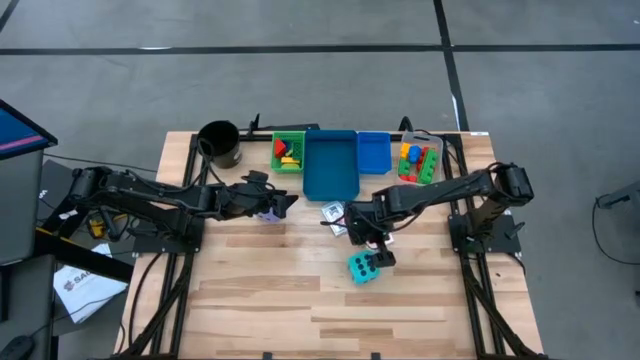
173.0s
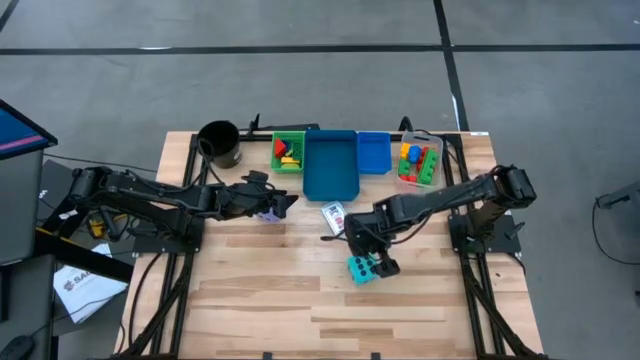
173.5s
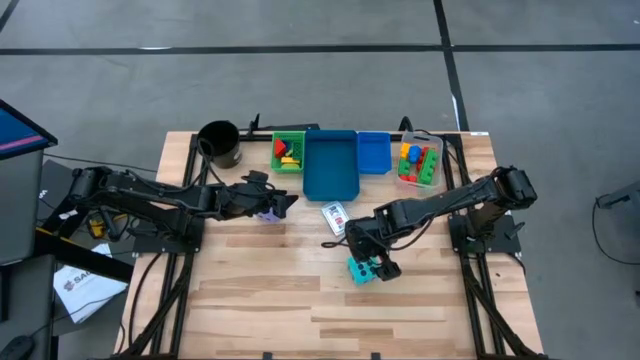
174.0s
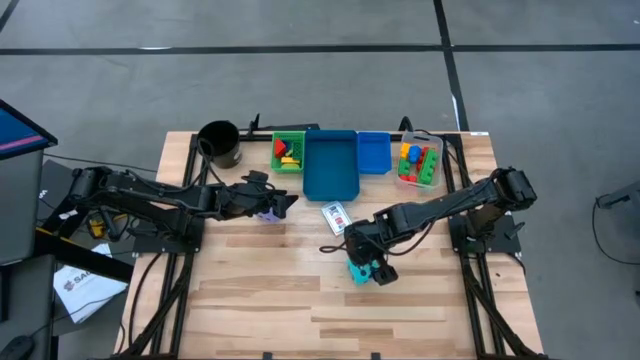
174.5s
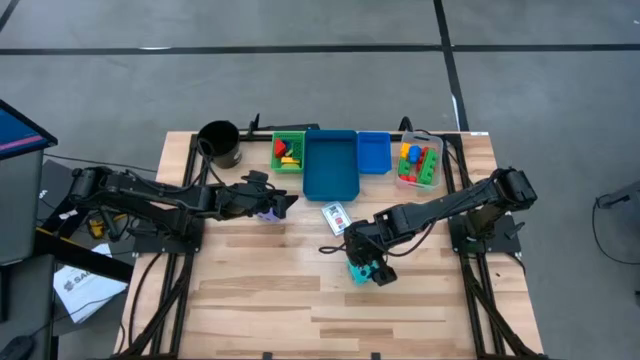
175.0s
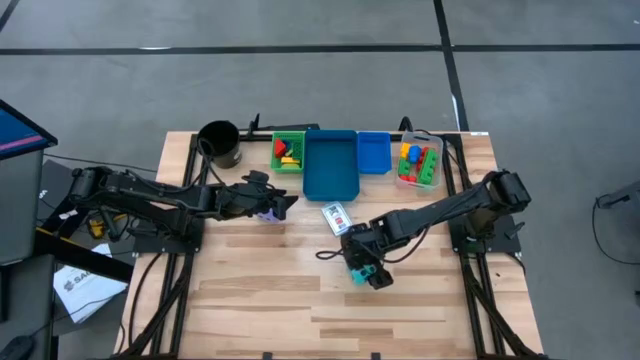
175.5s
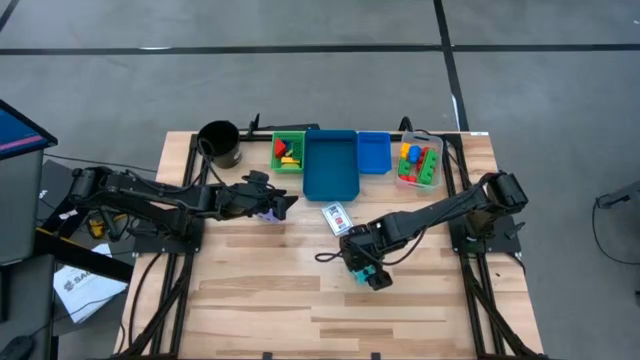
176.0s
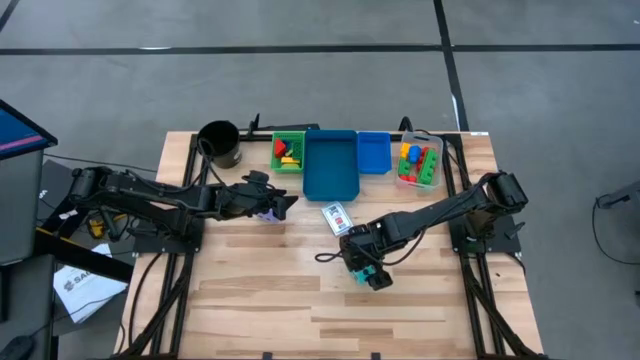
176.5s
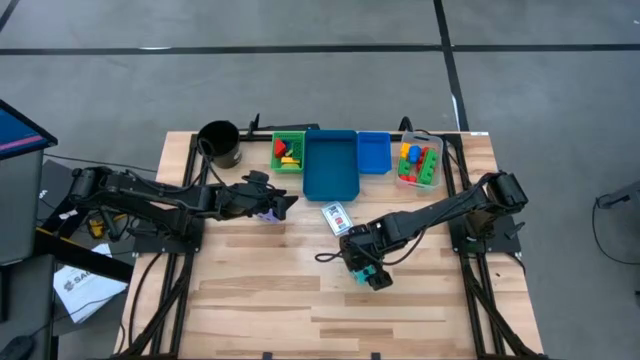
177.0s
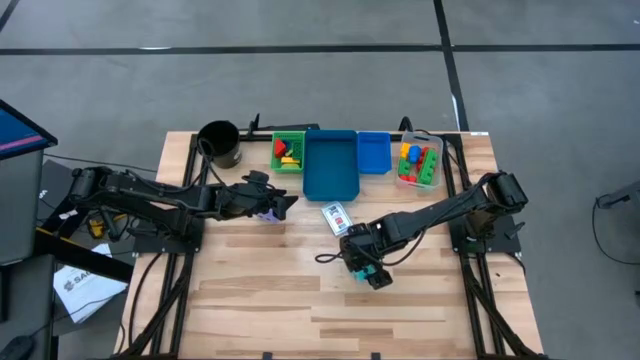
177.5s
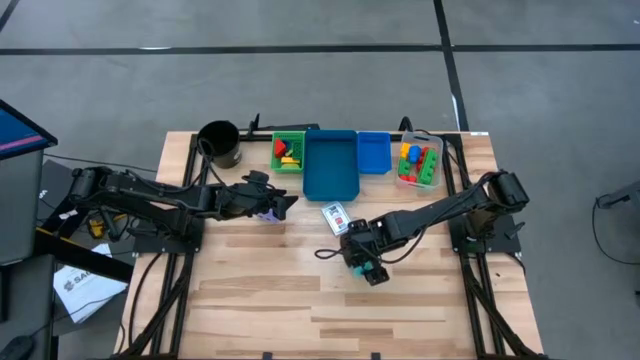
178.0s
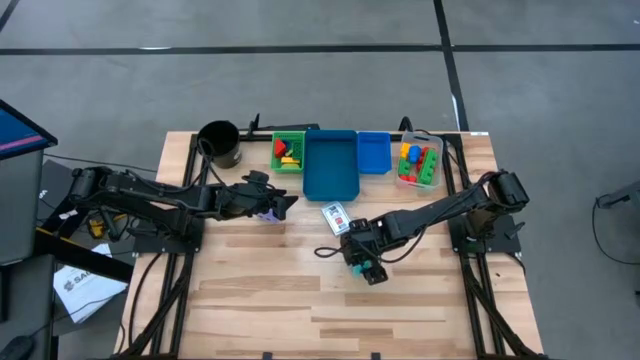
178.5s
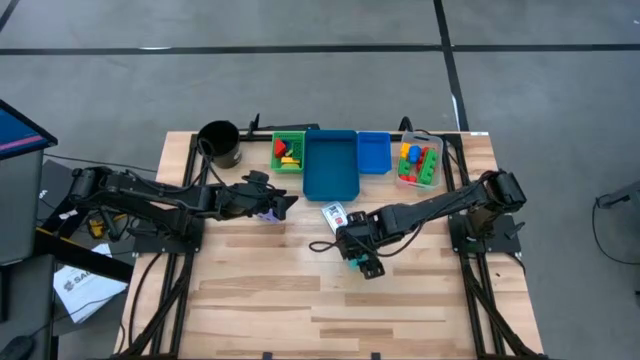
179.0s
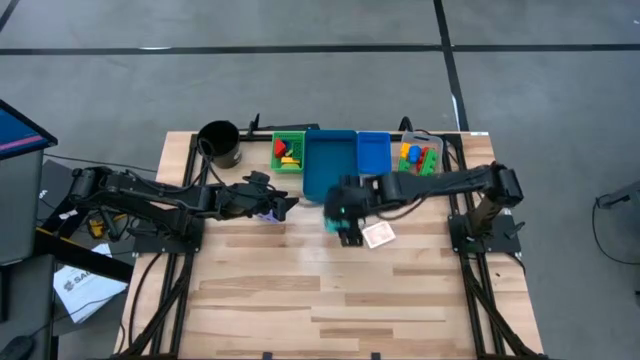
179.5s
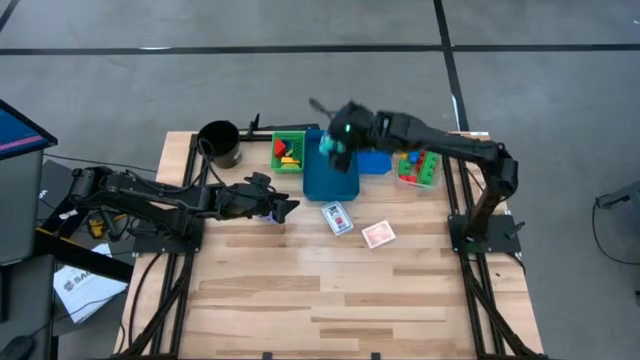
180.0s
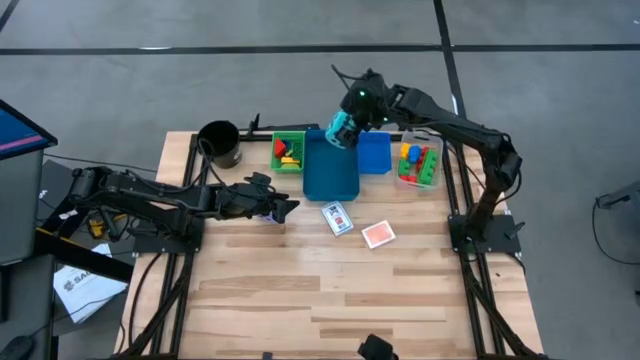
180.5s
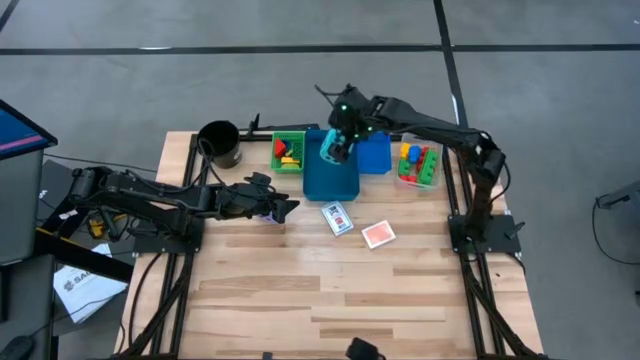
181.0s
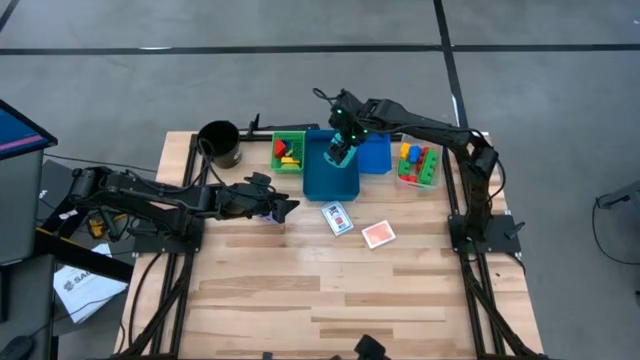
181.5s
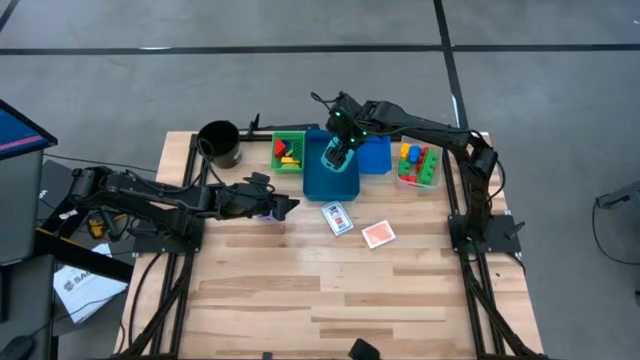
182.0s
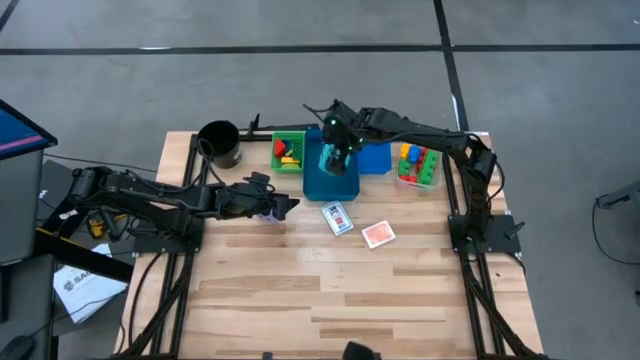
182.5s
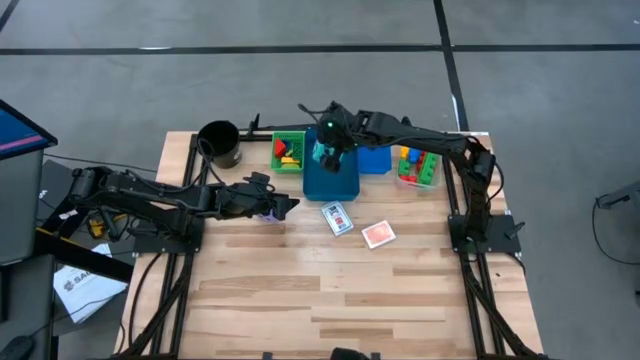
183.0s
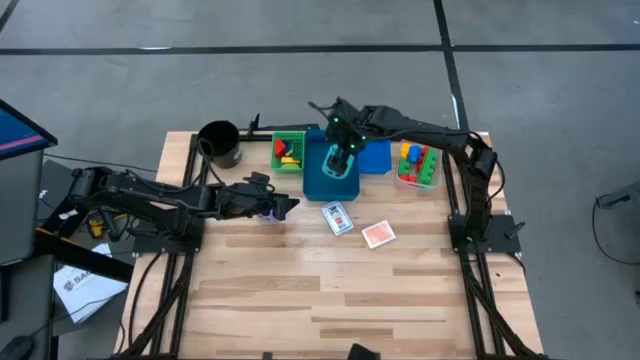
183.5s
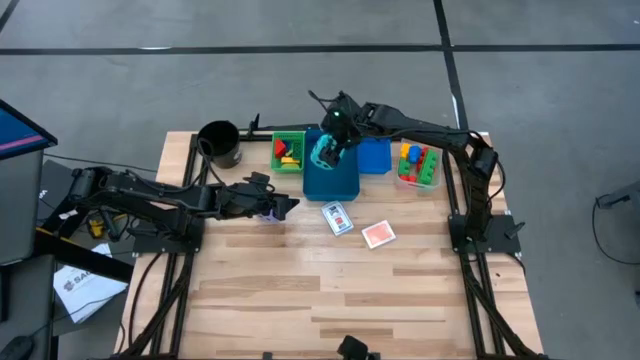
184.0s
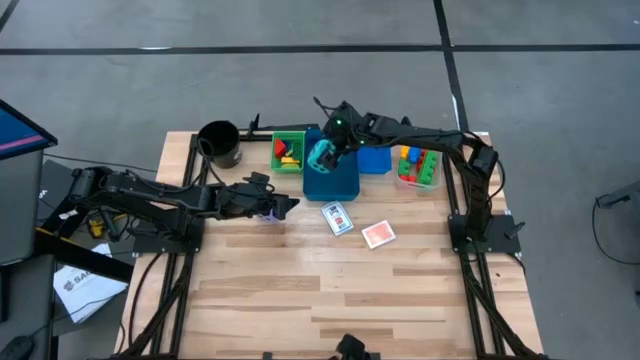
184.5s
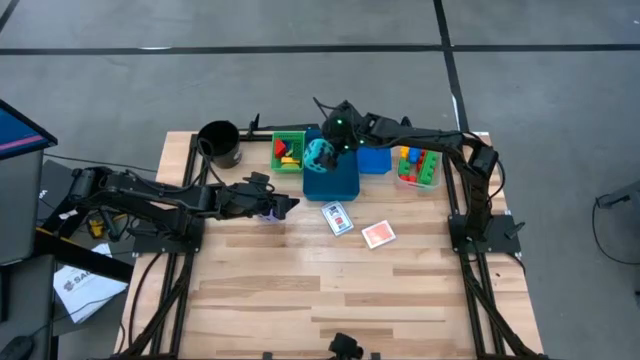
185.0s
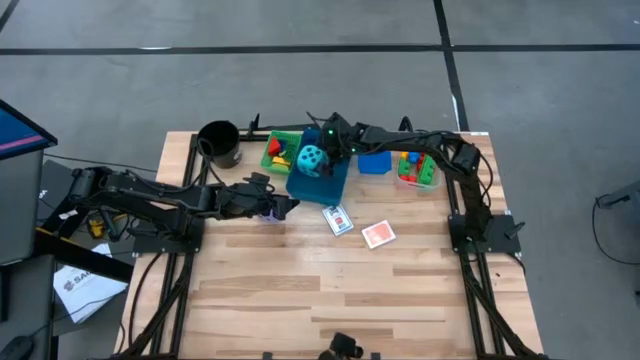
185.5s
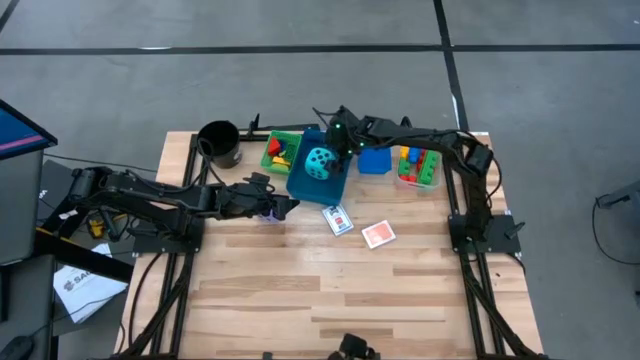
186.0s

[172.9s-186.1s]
Task: Pick & Place Toys
Put the blue die into the blue bin

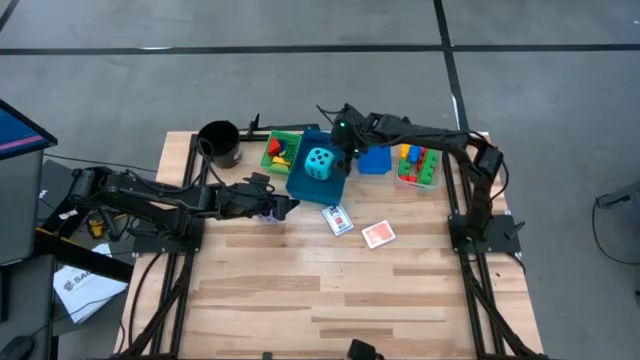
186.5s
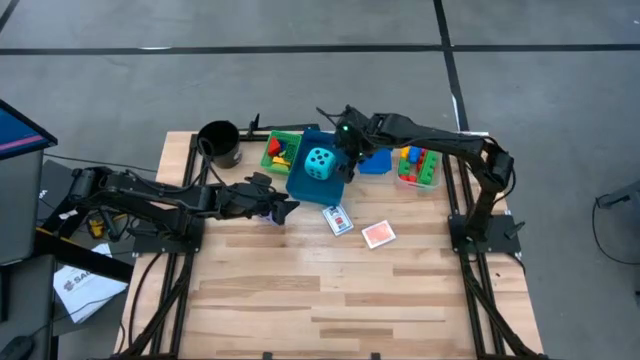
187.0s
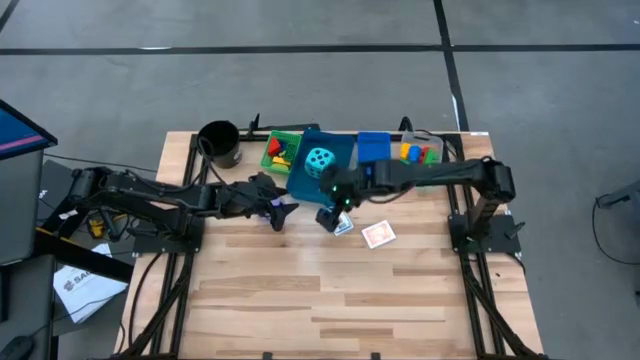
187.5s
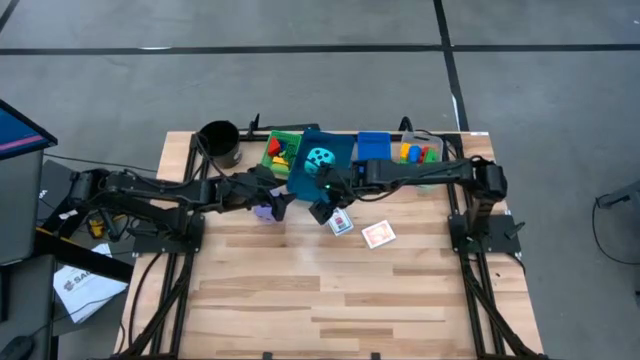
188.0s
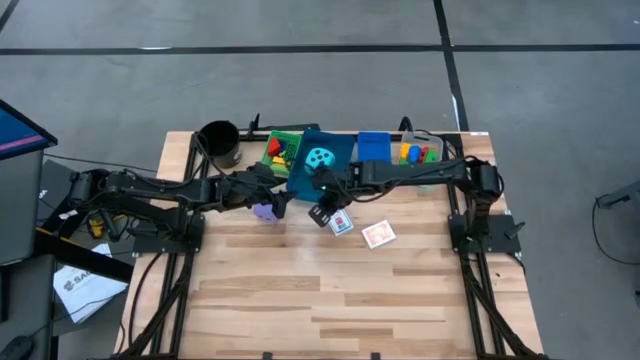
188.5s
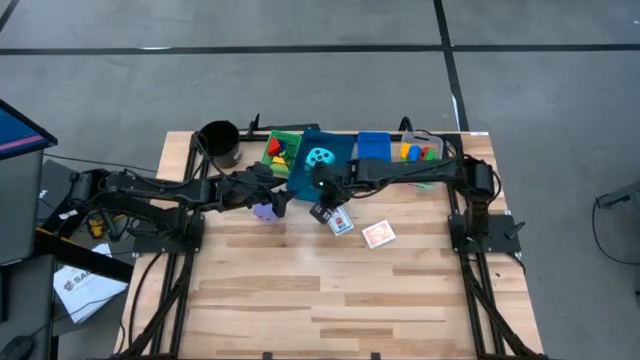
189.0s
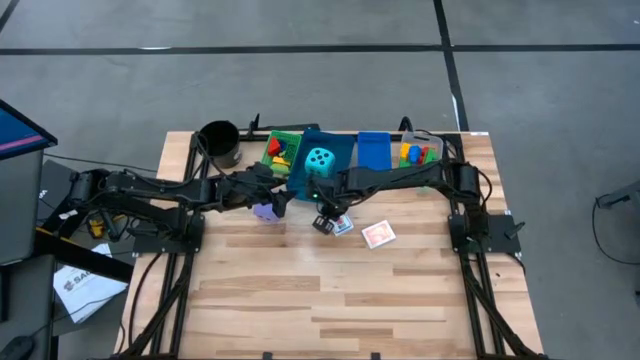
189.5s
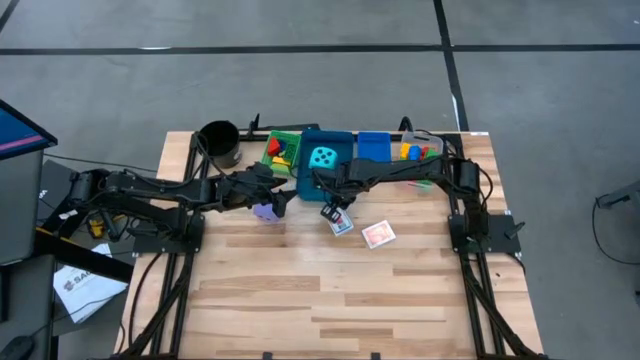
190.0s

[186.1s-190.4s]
Adjust the blue bin on the table

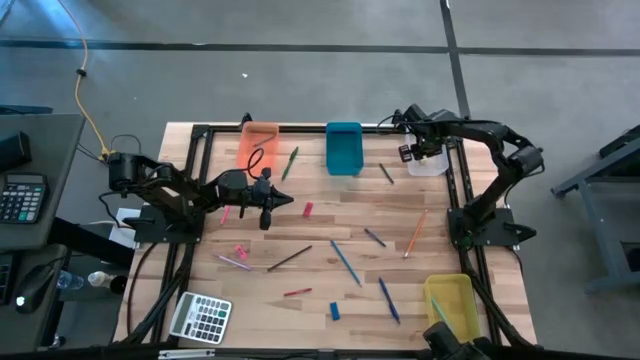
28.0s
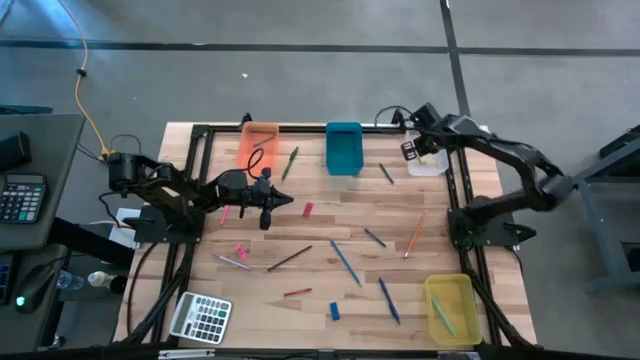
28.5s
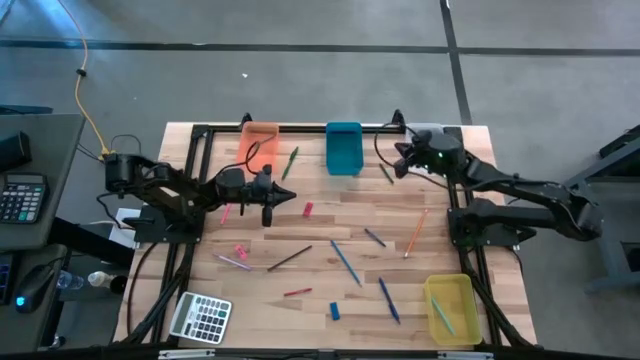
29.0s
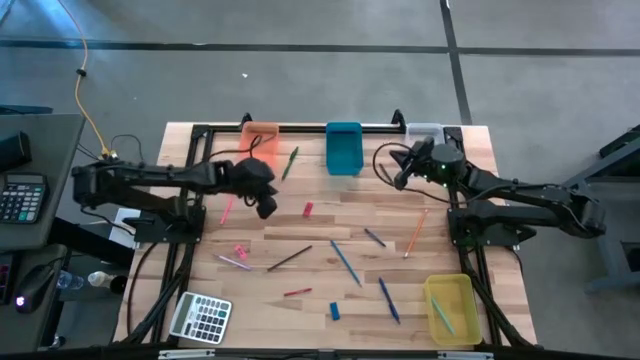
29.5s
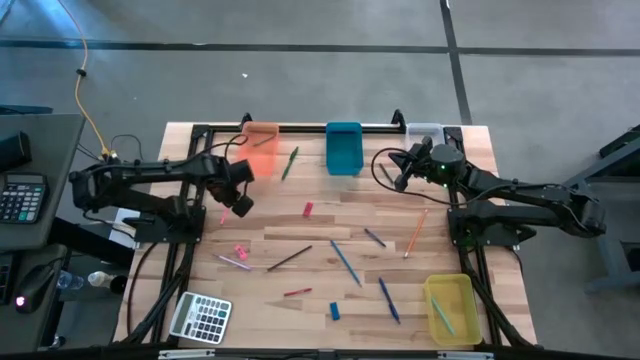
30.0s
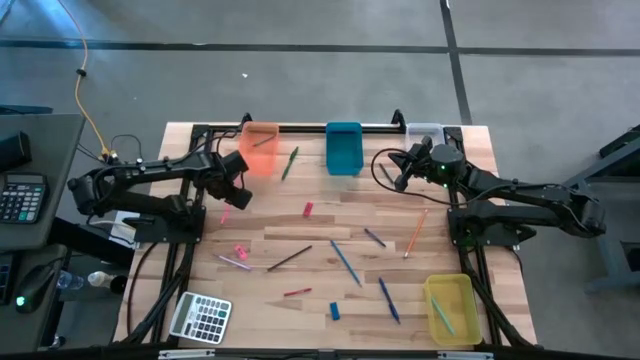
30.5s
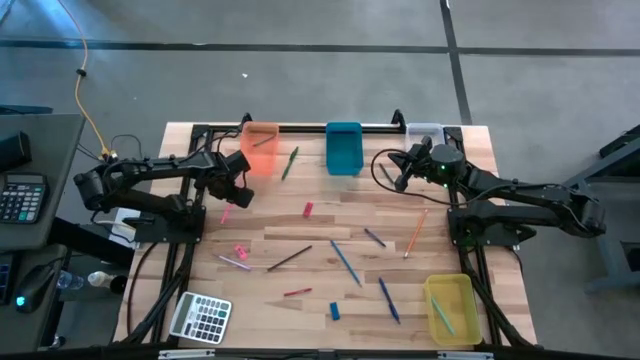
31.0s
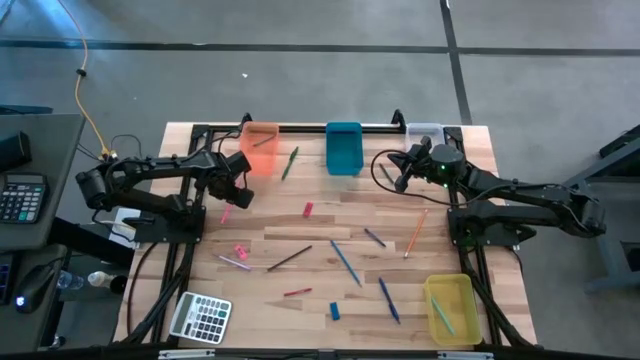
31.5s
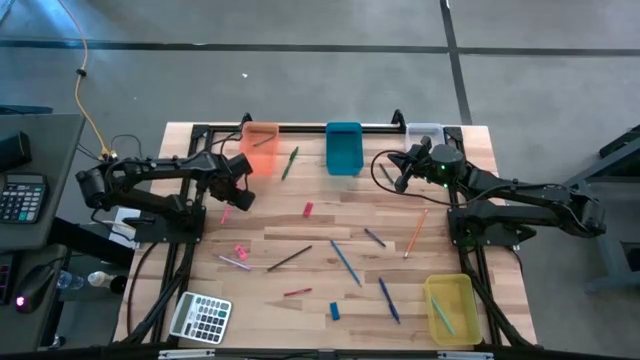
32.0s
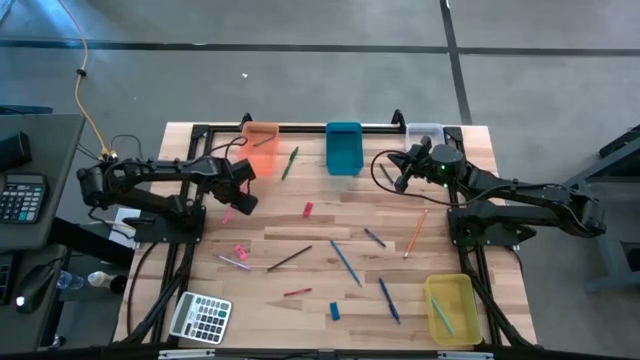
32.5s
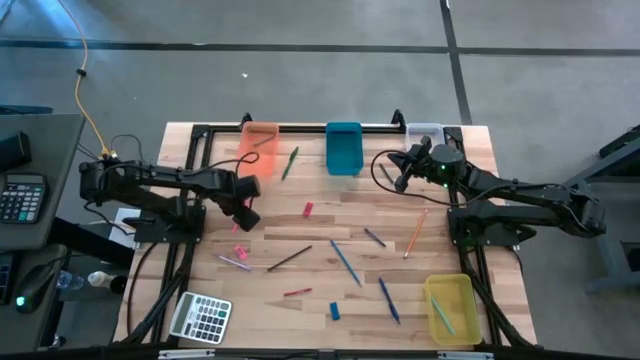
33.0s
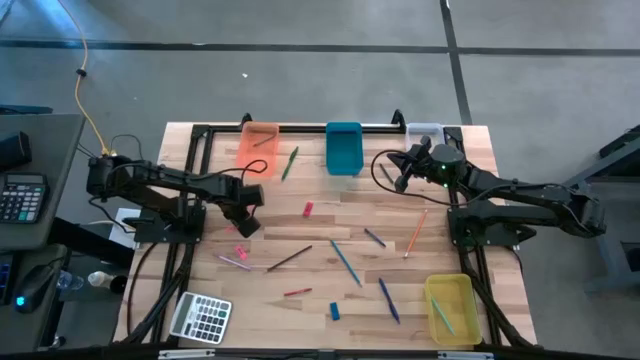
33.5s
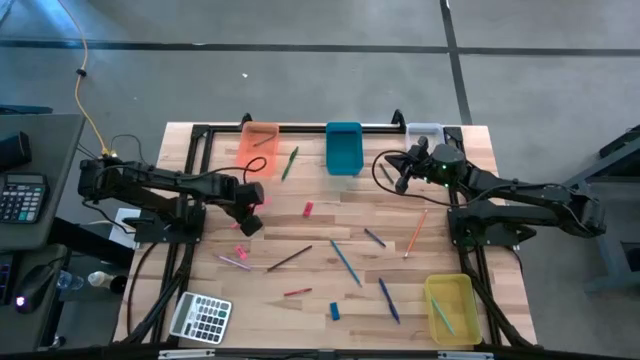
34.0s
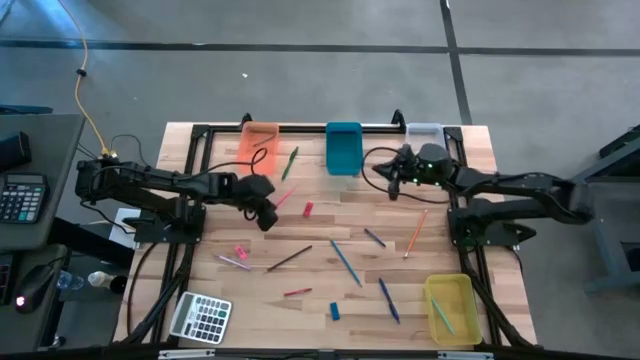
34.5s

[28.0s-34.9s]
Task: Sort crayons/erasers/pens/pencils in bins
Put the pink pencil into the blue bin
